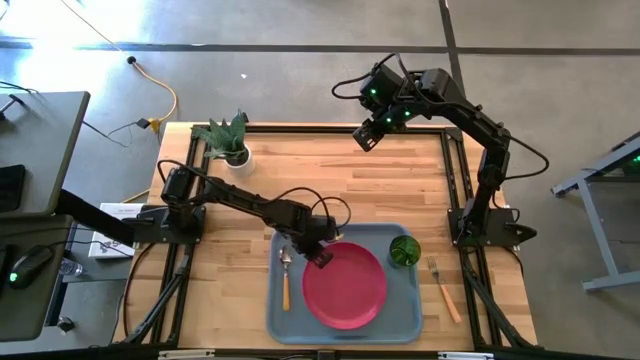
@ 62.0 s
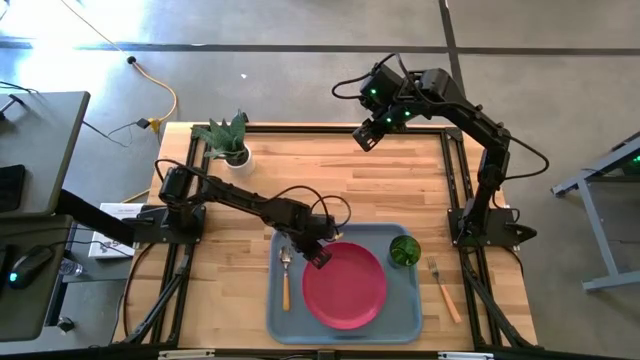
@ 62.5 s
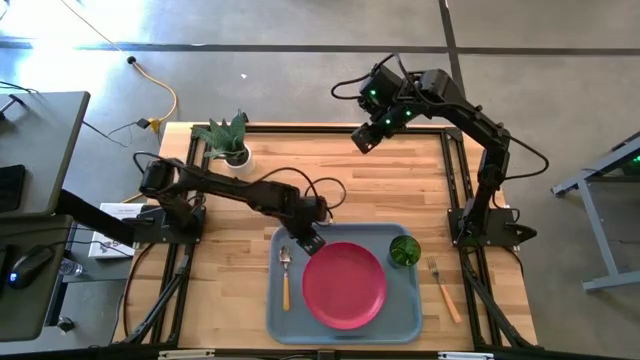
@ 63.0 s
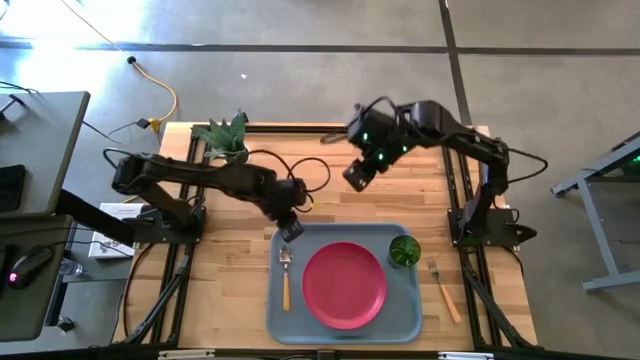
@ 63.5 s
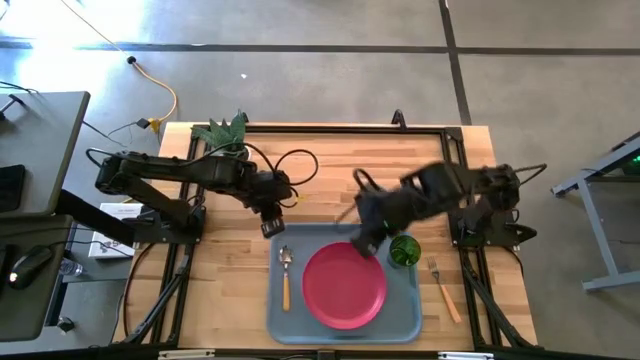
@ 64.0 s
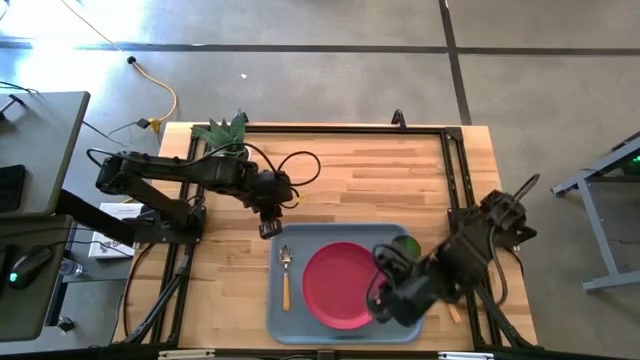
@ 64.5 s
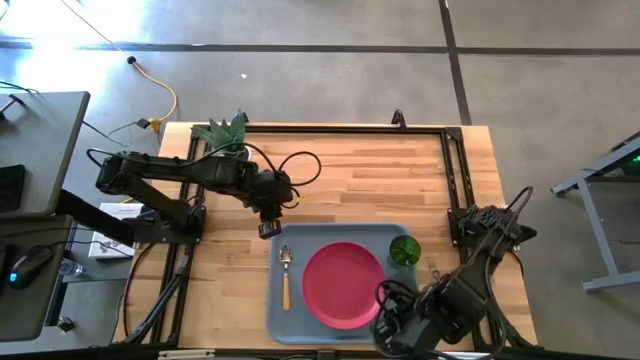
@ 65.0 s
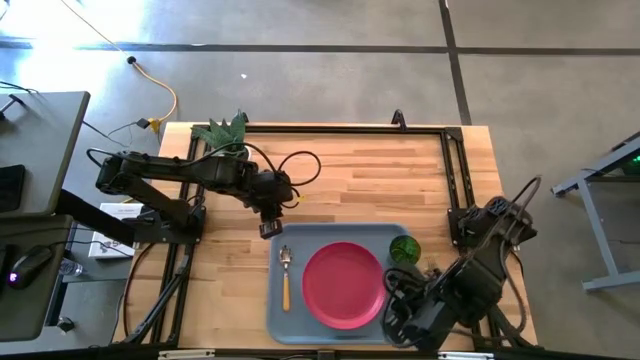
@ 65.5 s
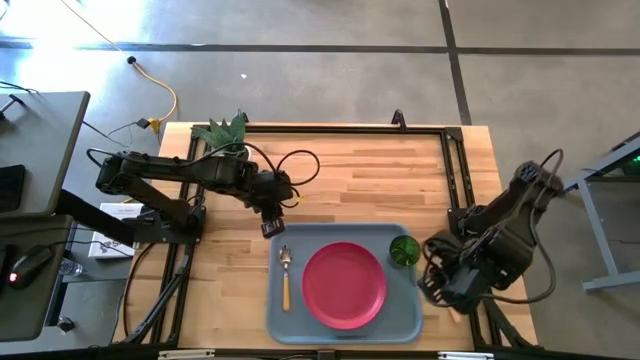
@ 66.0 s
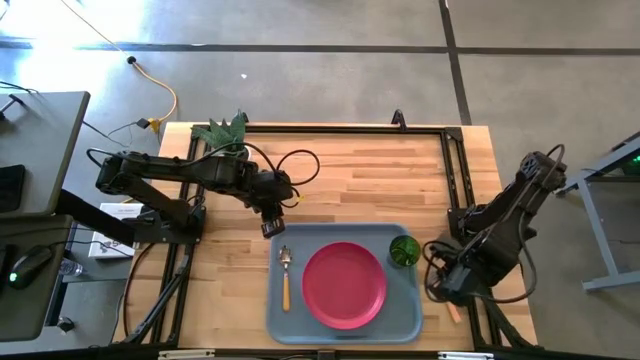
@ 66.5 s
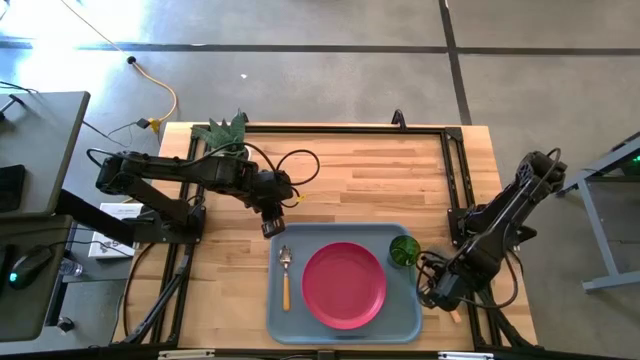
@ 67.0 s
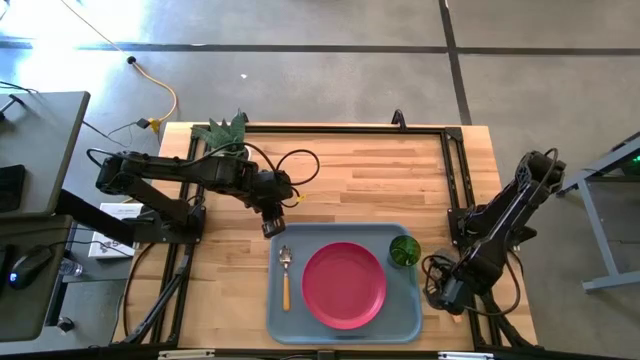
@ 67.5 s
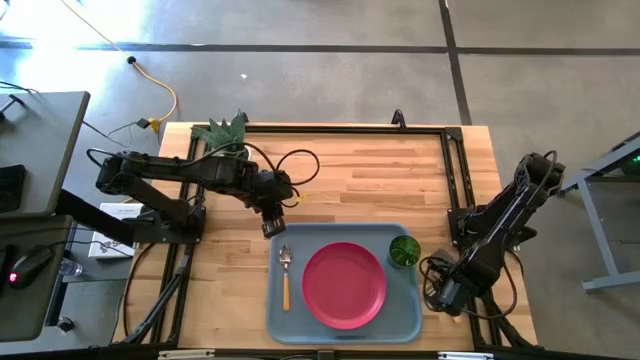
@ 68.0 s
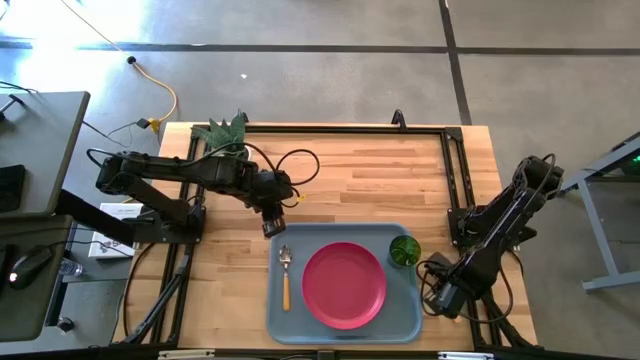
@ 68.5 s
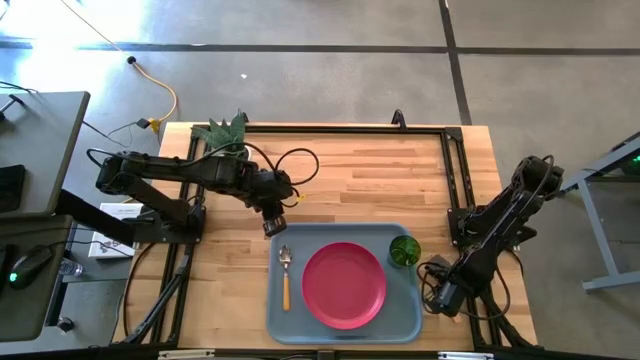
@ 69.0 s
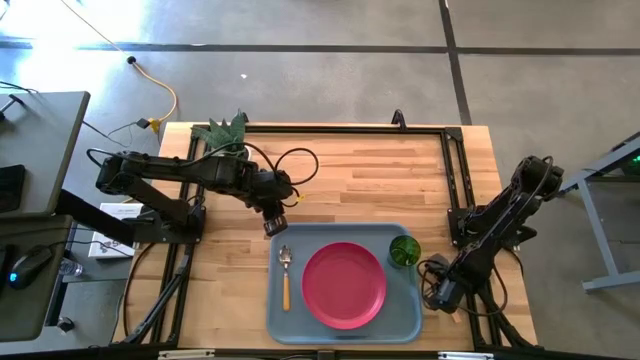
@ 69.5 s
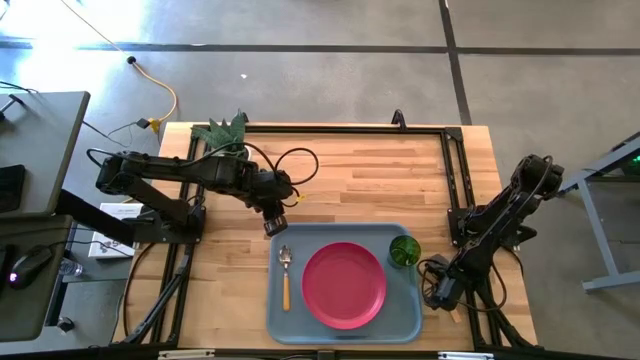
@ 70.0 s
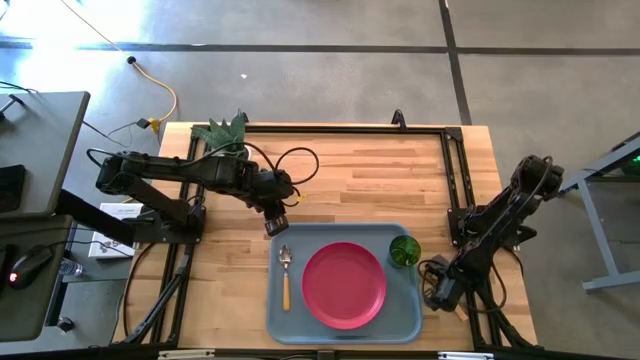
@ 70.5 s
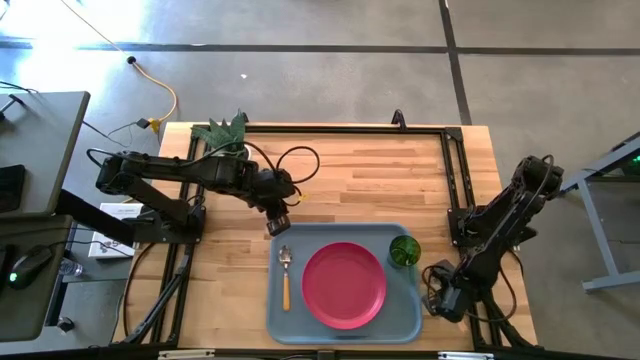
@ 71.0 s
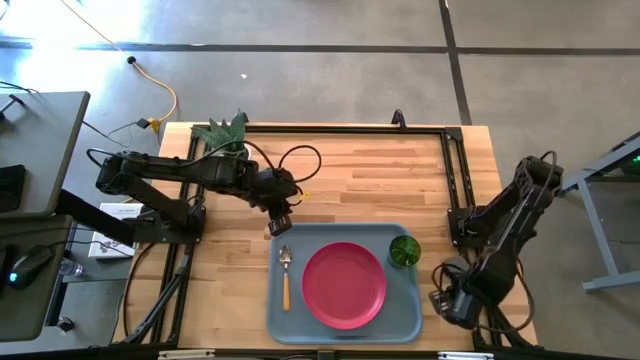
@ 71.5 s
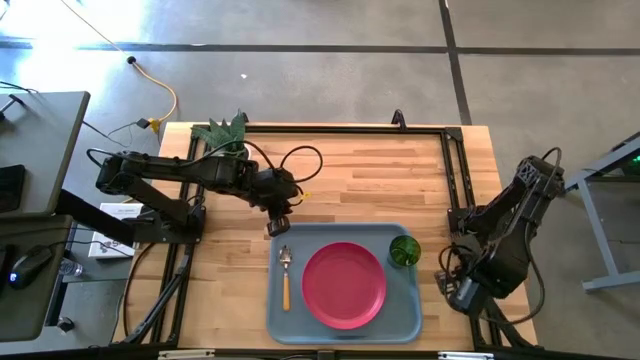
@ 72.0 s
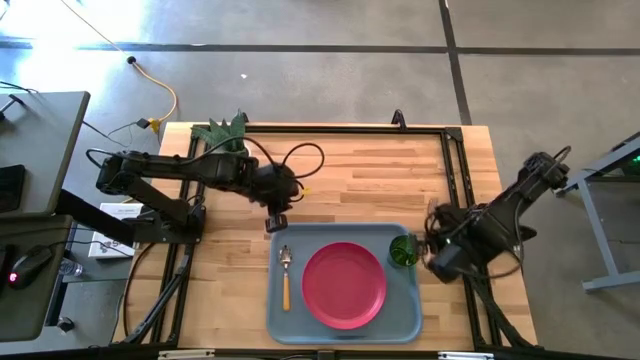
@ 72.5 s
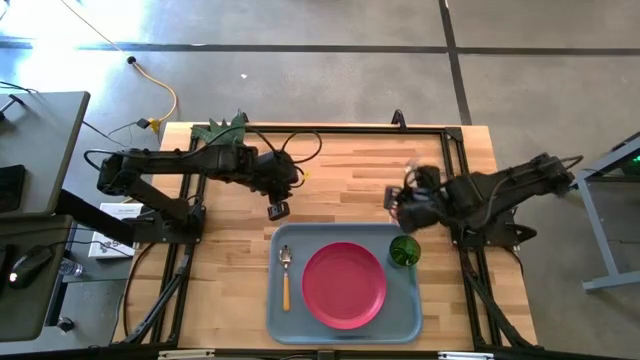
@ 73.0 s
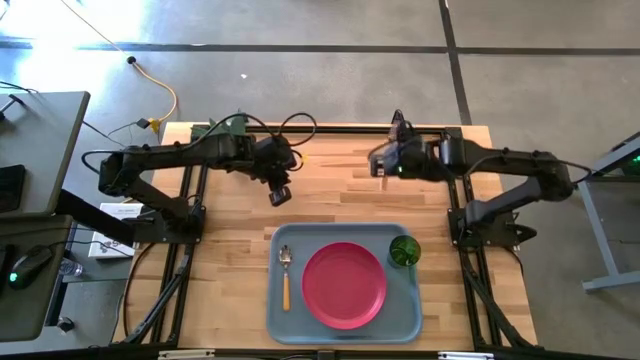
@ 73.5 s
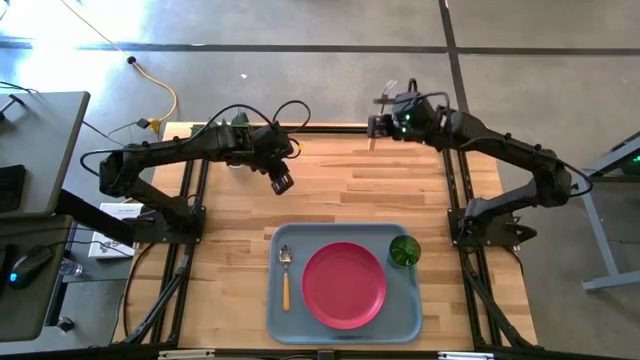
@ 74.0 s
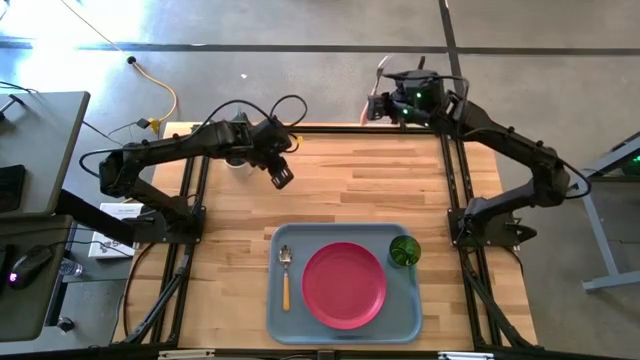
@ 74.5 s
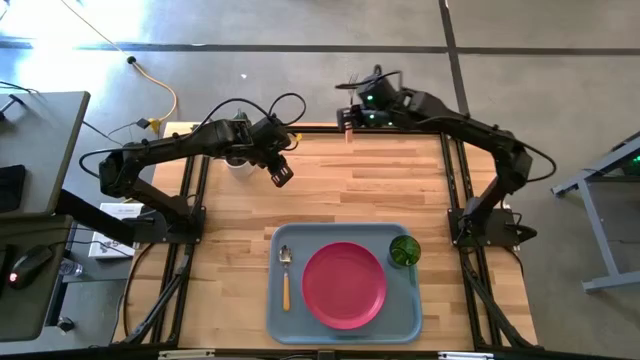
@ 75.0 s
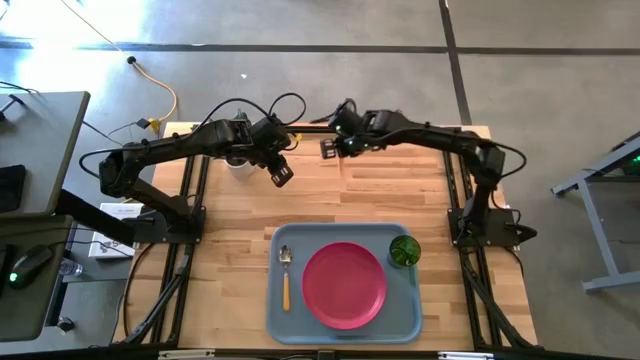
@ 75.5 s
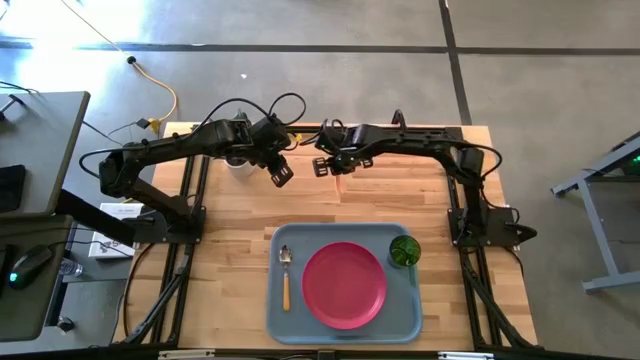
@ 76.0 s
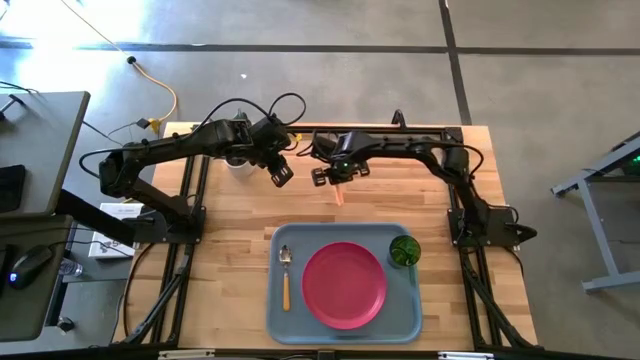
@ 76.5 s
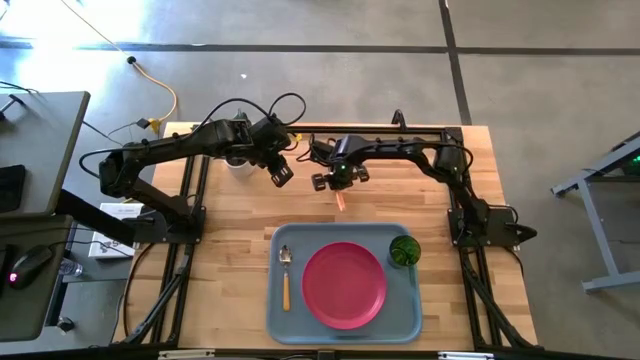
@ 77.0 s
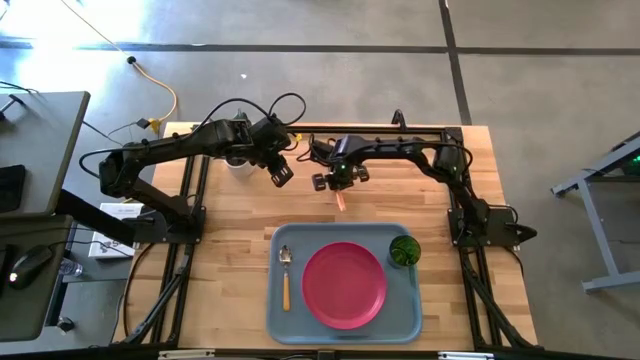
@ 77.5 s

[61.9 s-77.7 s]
Task: Pick and place plate/cup/fork/spoon on tray
Put the yellow fork on the blue tray

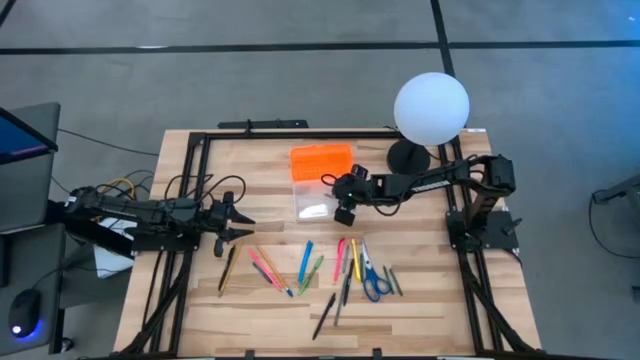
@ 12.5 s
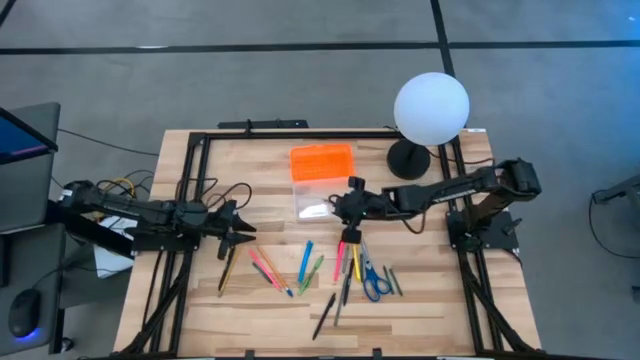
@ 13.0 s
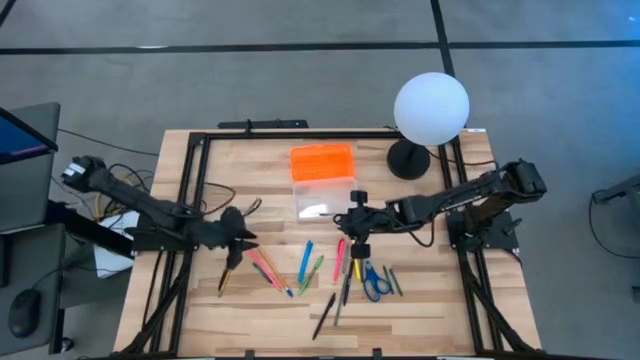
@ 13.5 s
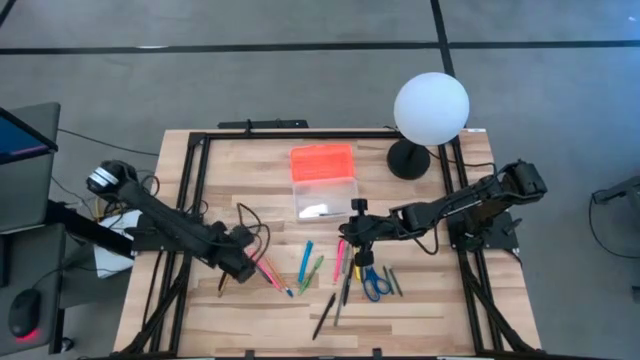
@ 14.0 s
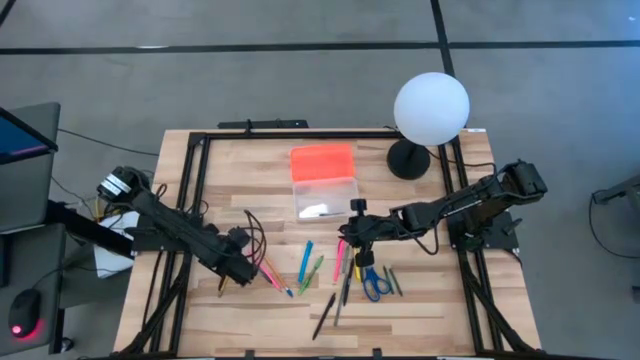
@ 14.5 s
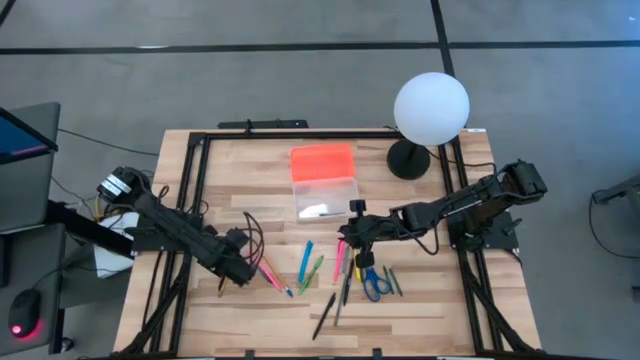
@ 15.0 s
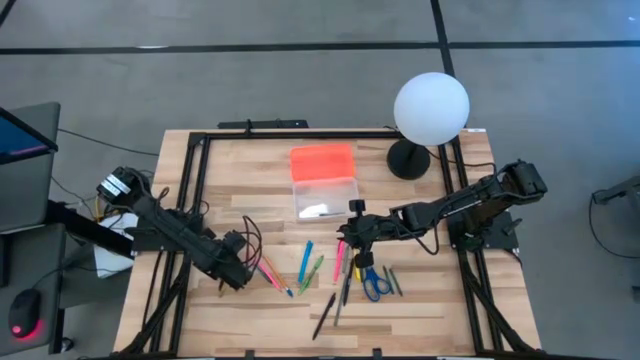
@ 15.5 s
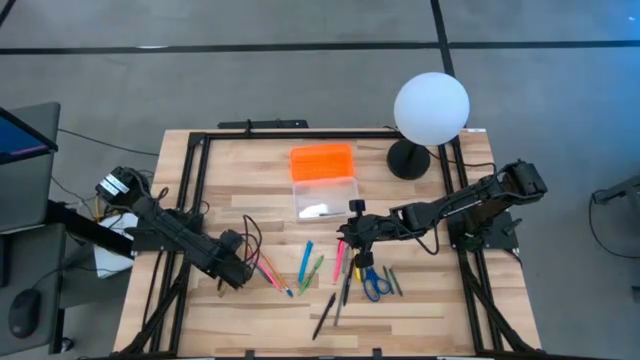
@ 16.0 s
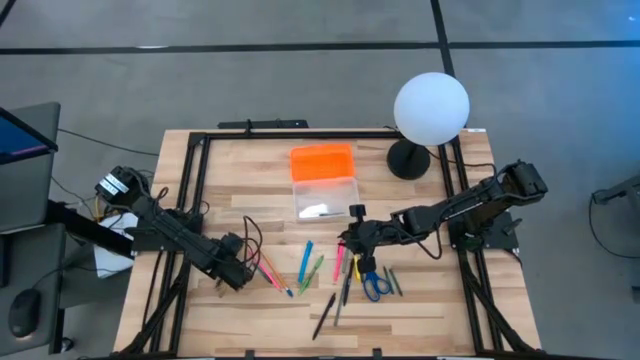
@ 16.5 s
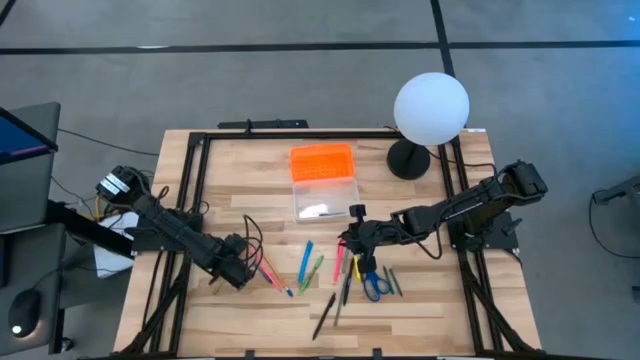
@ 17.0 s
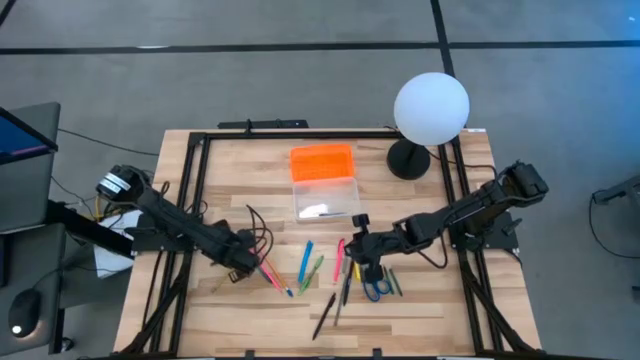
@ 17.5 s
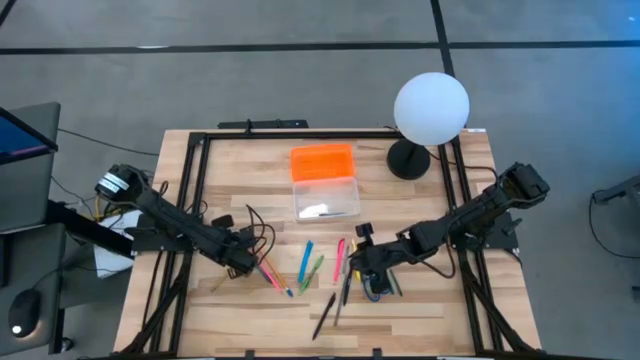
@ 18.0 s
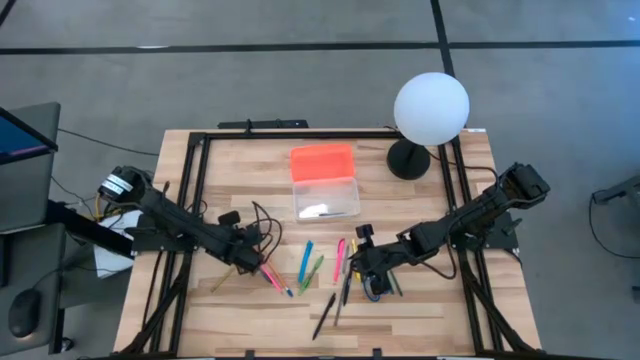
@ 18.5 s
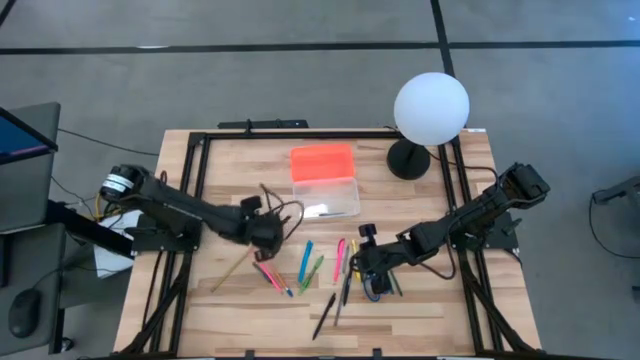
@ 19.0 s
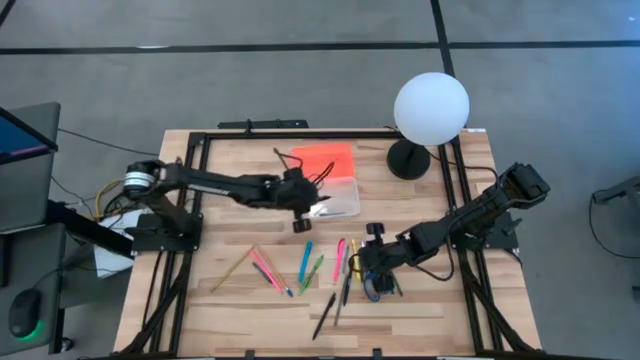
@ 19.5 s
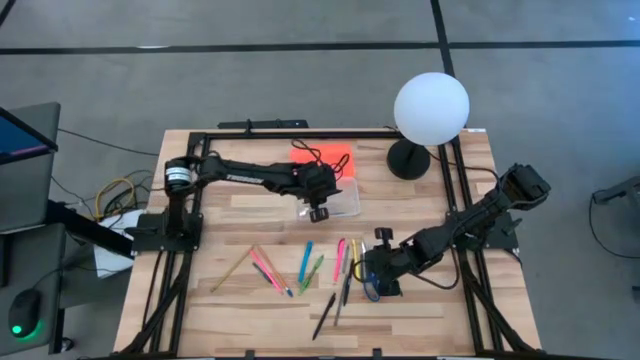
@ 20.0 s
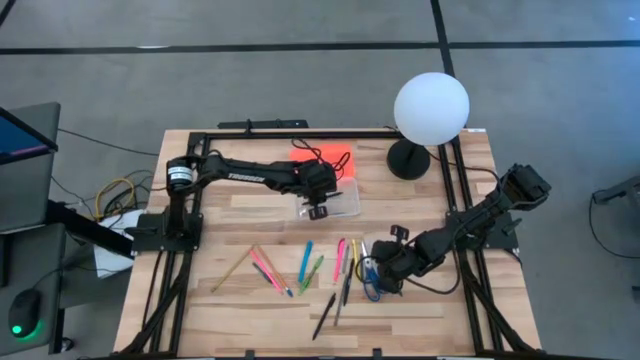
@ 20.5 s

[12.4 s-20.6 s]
Task: Pick & place school supplies into a supply box
Put the black pen into the supply box
